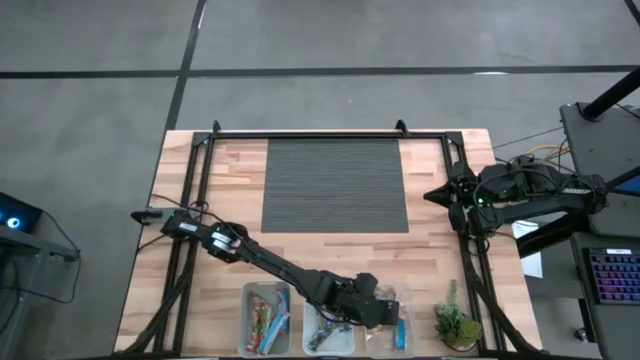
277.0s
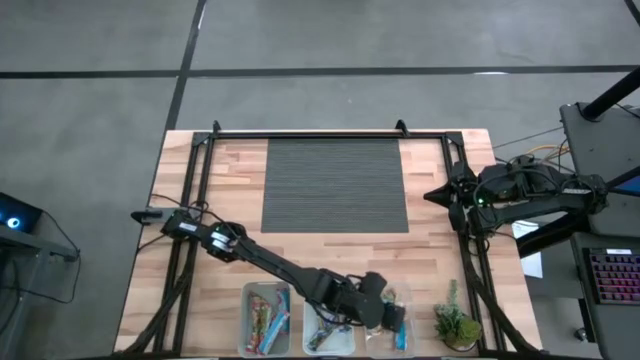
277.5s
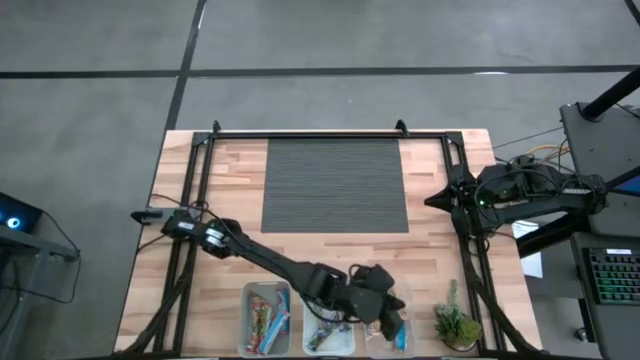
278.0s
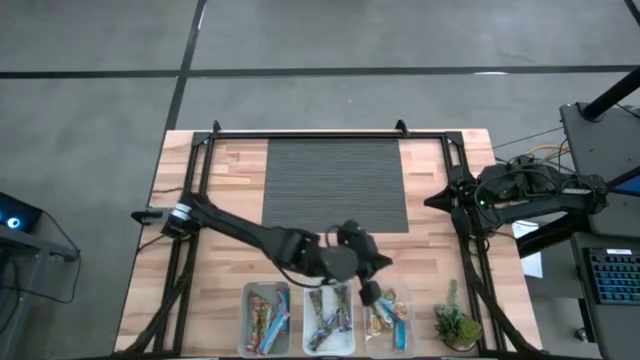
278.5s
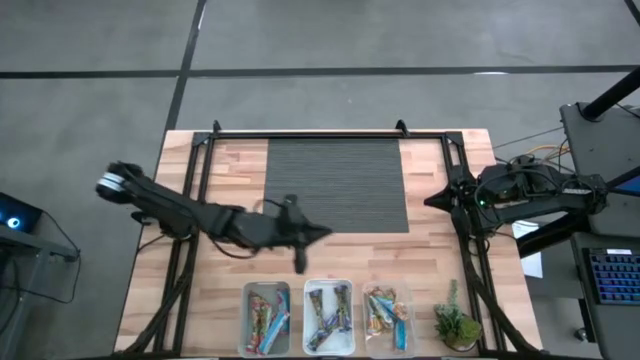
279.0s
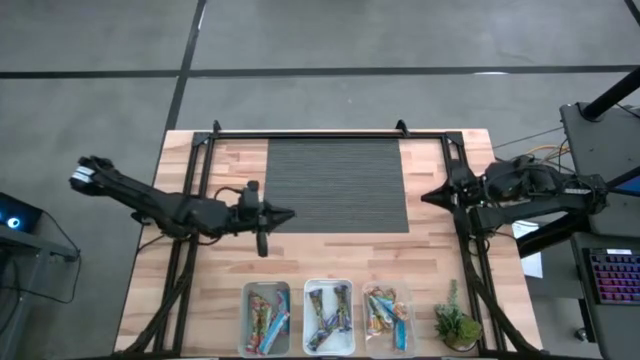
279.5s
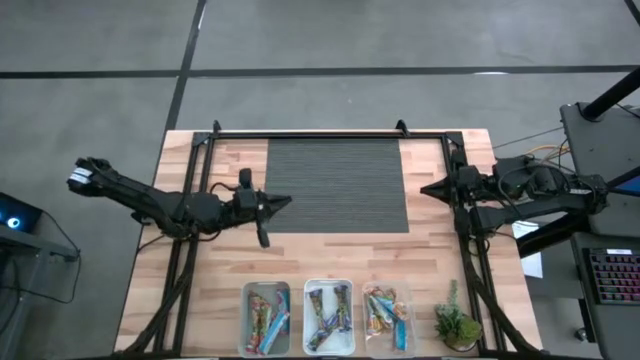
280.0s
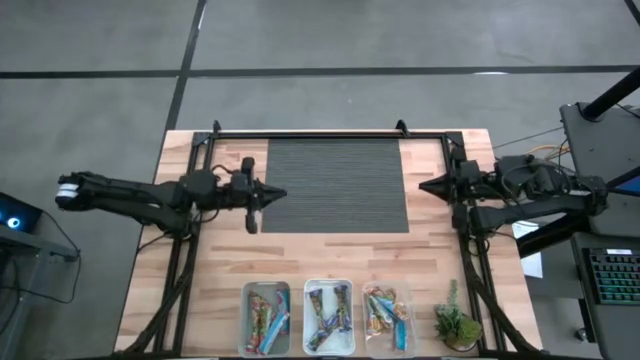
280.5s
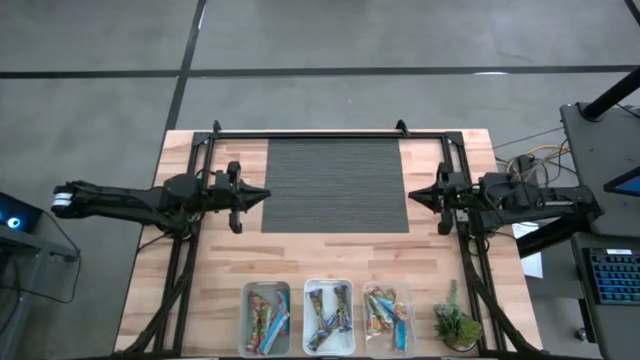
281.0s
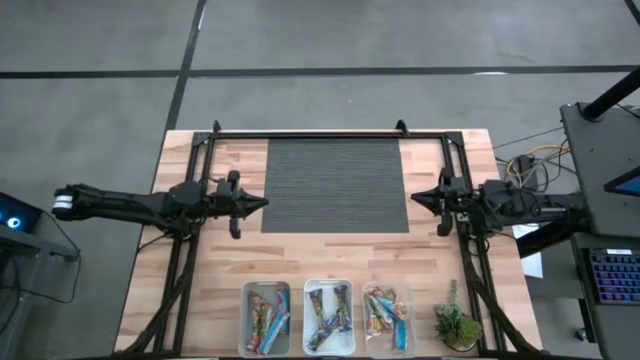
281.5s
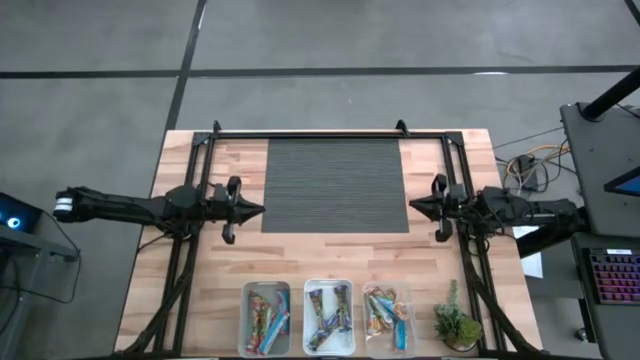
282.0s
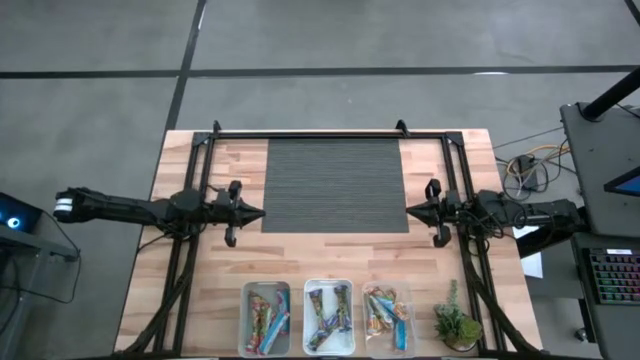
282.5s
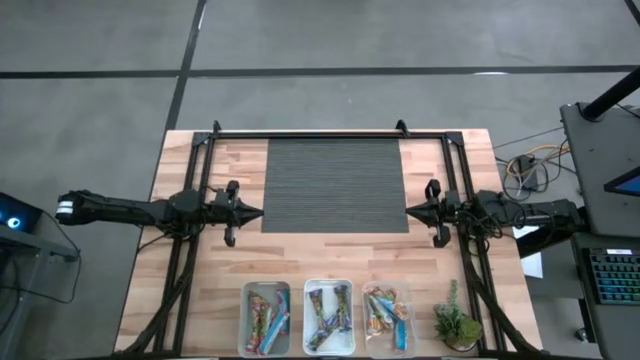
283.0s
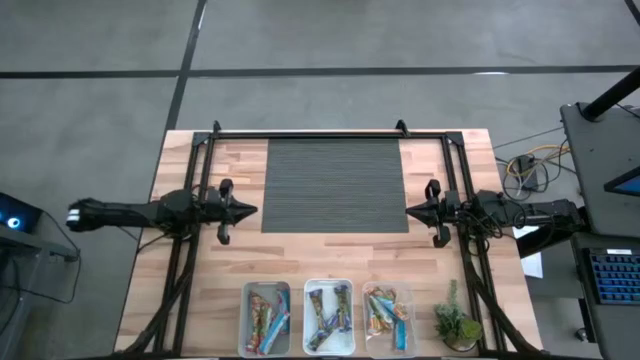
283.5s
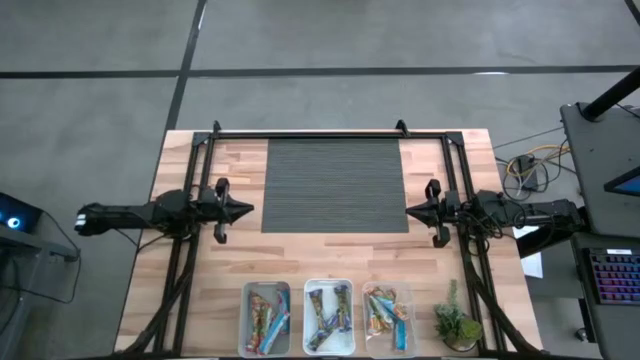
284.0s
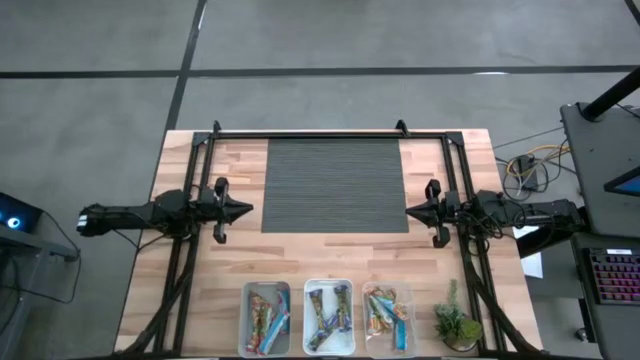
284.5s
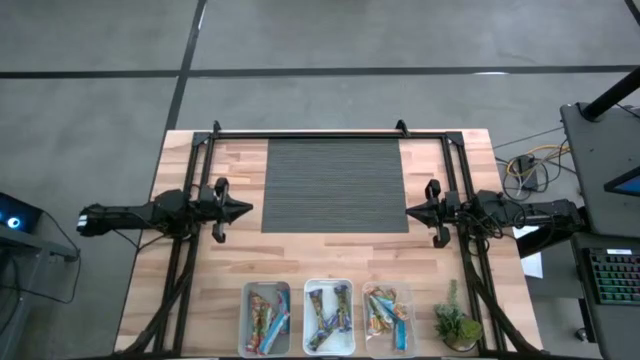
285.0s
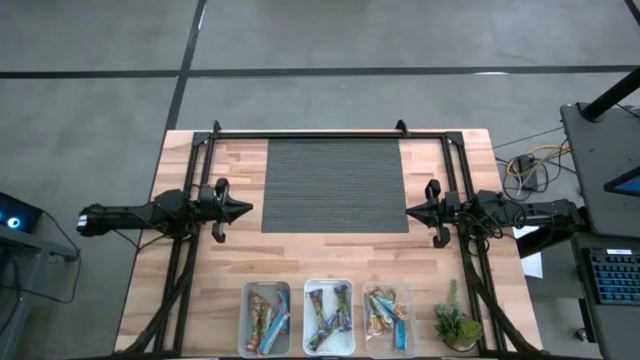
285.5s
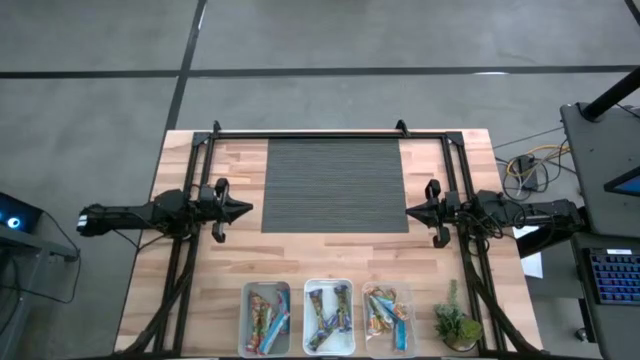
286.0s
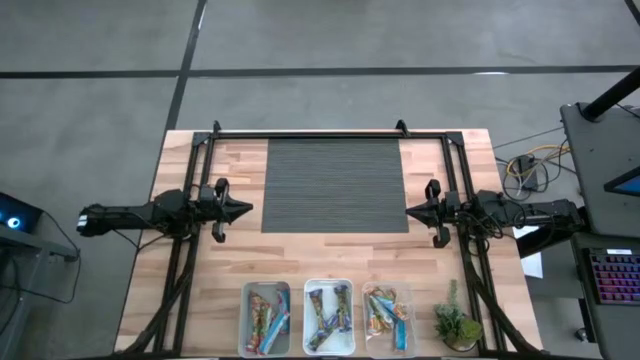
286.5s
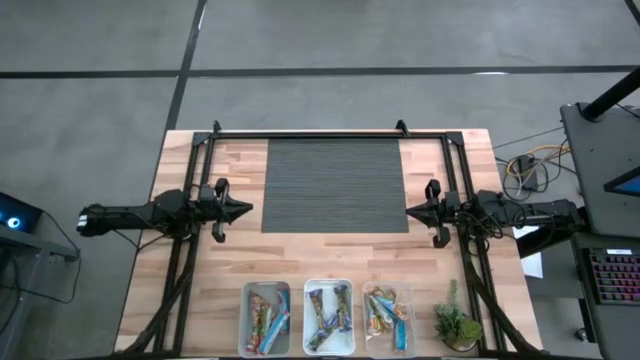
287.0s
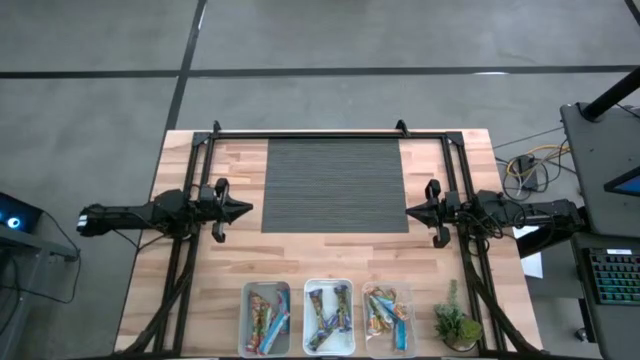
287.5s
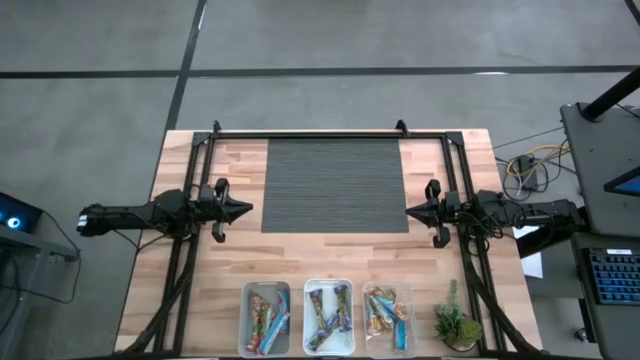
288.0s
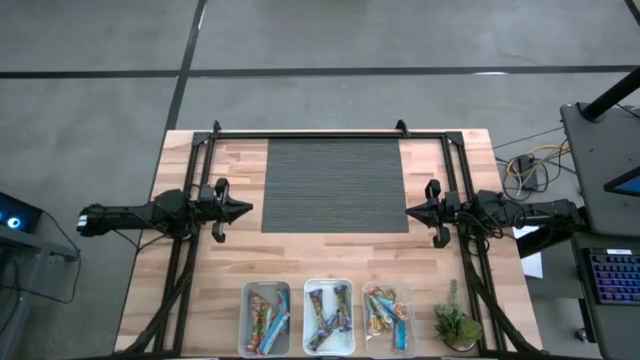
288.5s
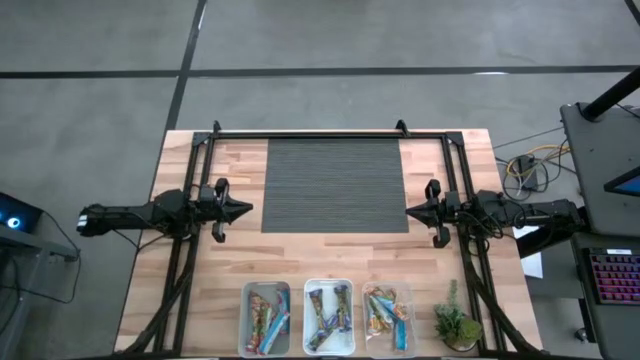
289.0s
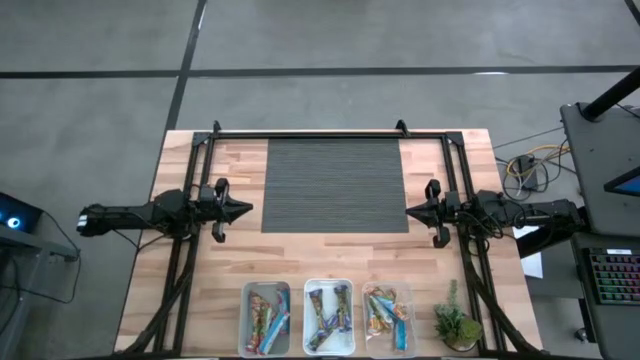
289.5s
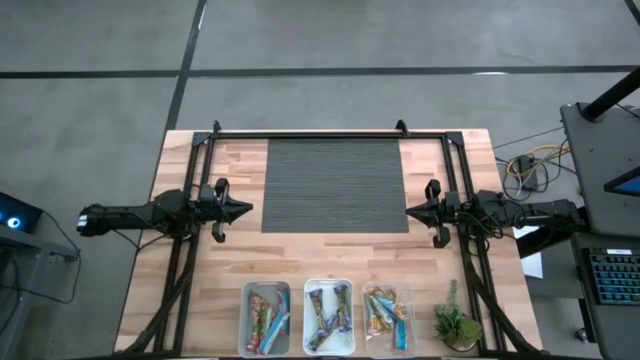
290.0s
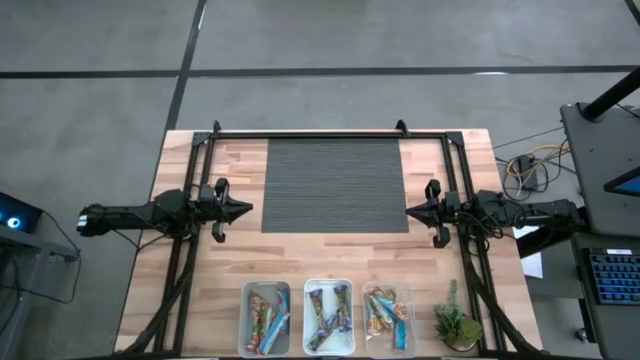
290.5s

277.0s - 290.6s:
Task: Pick and place Granola Bars by type
Return to Home Position

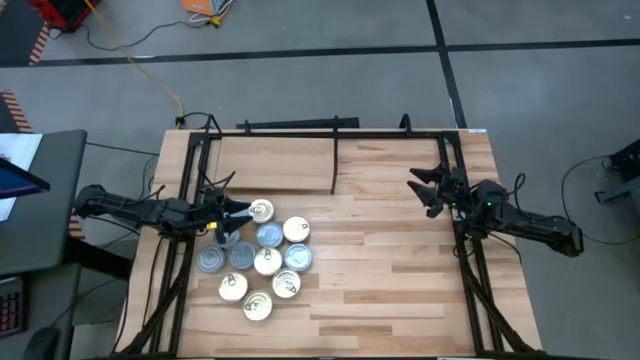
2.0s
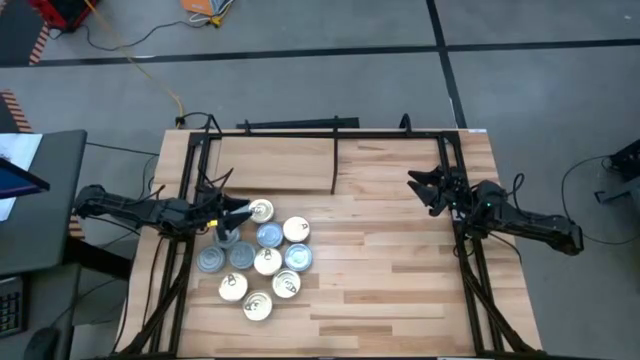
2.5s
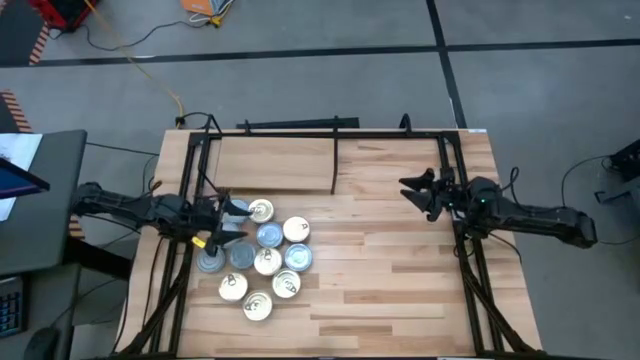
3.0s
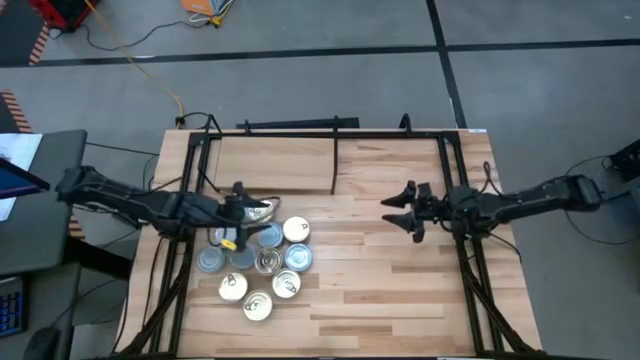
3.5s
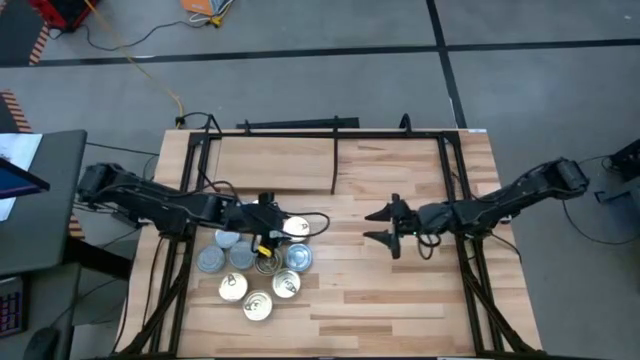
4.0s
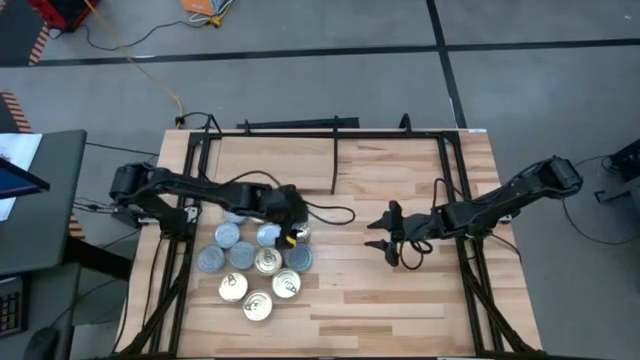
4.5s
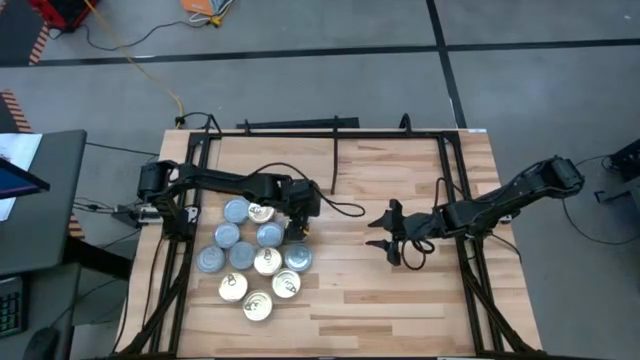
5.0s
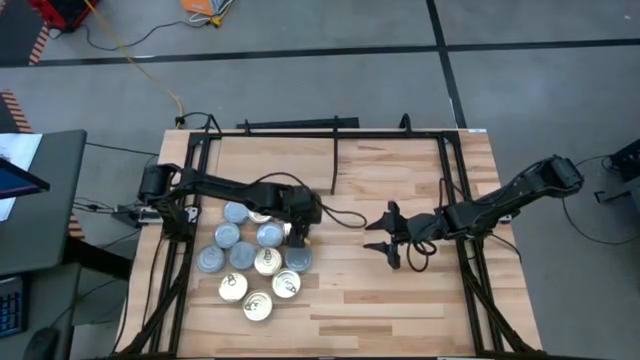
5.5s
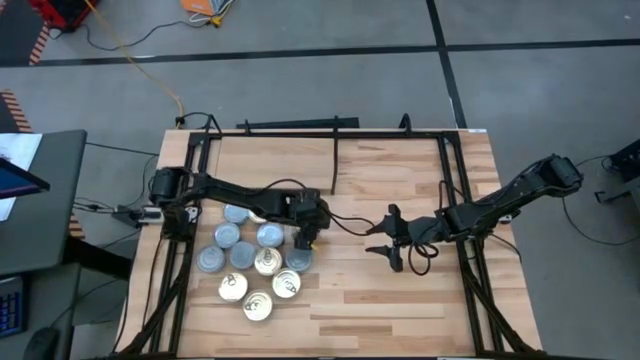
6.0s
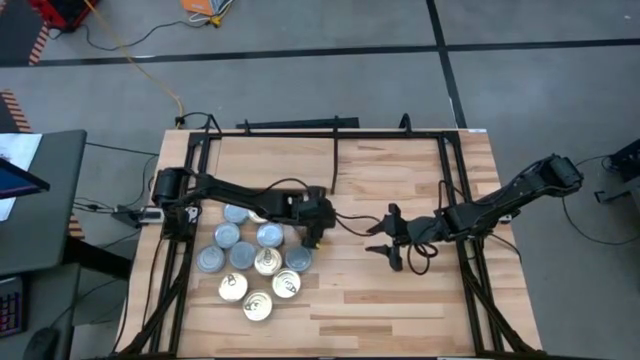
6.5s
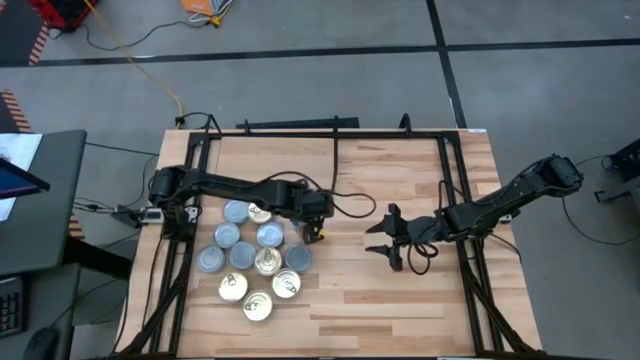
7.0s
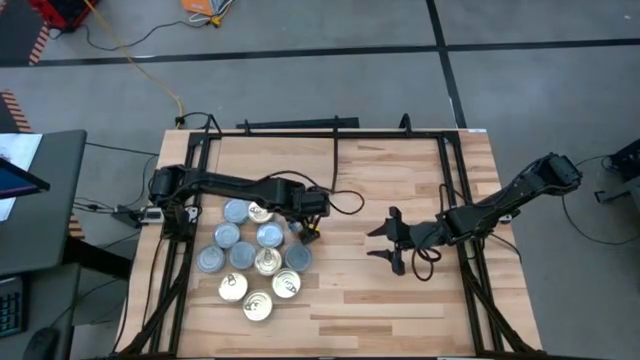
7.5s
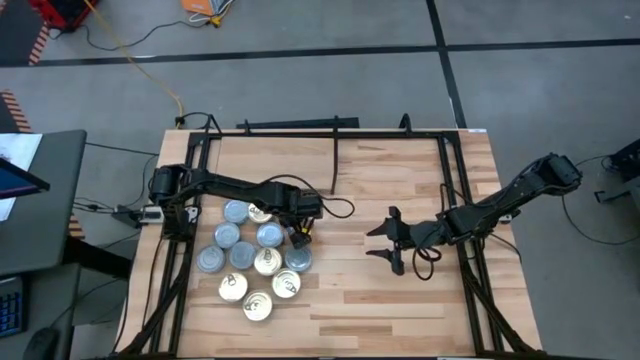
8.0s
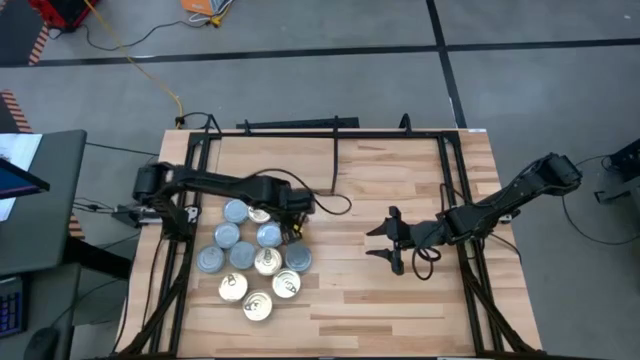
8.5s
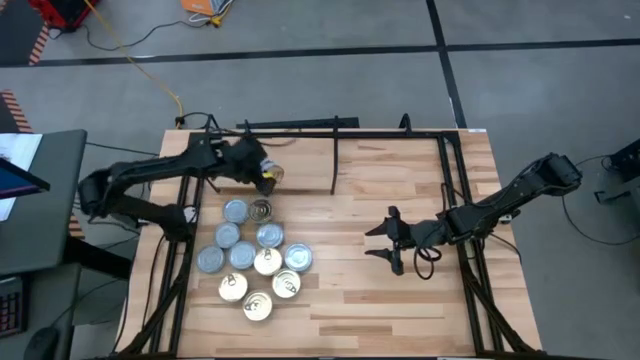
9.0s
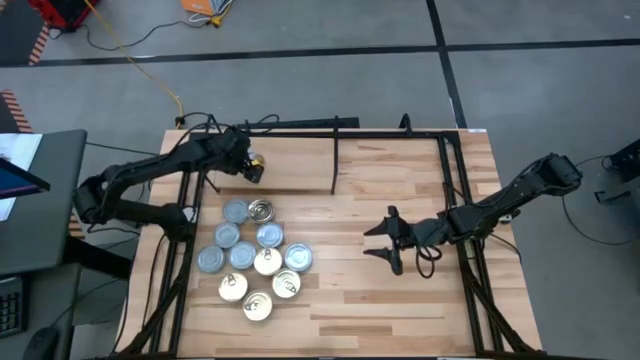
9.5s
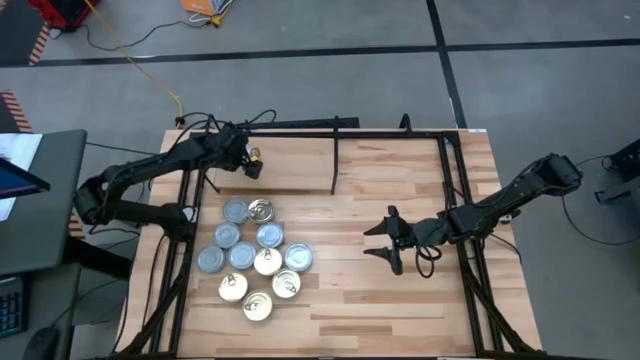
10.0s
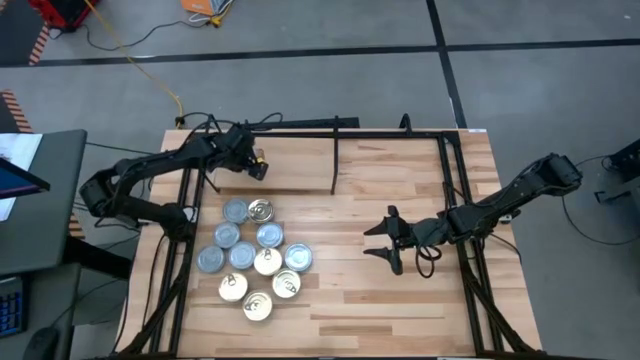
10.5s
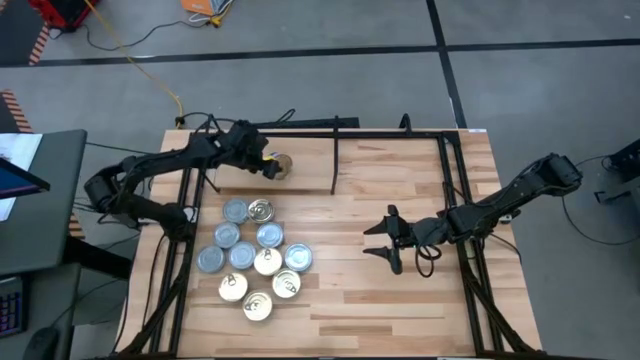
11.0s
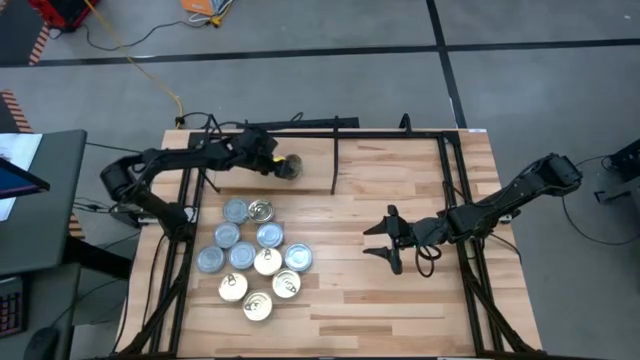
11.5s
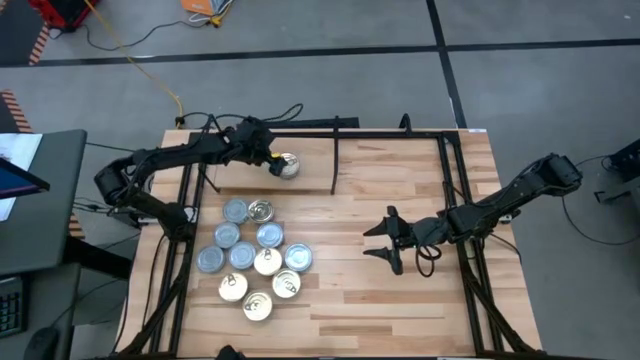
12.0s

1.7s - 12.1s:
Task: Stack canned seafood by type on shelf
Put the blue pink tuna can on the shelf
